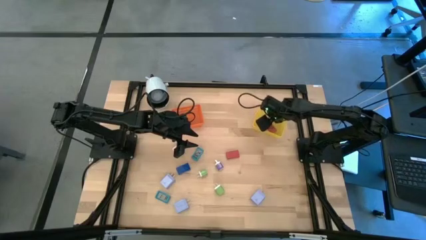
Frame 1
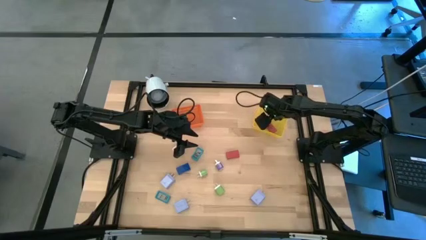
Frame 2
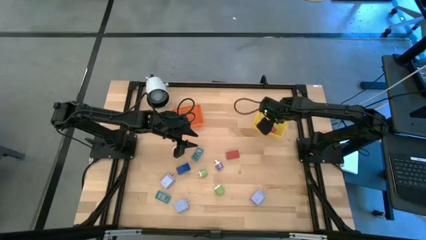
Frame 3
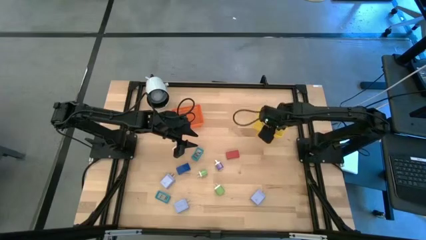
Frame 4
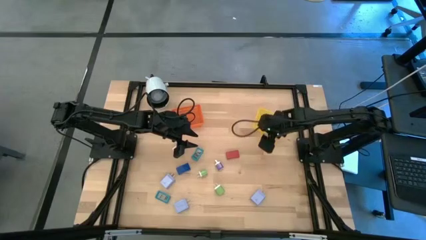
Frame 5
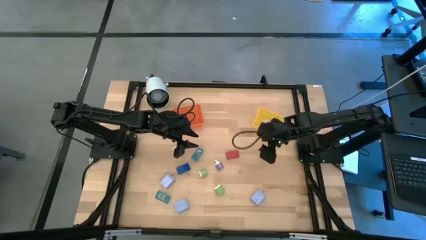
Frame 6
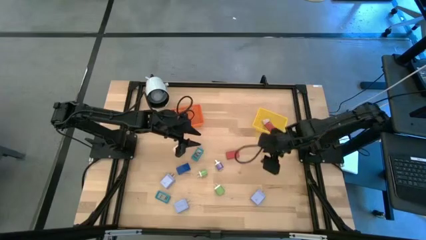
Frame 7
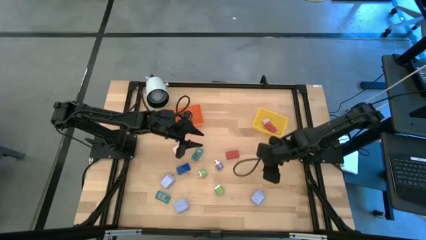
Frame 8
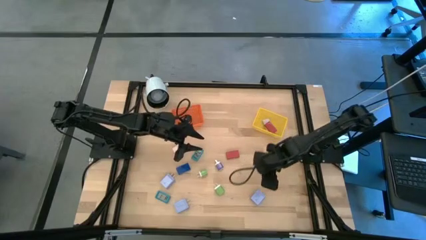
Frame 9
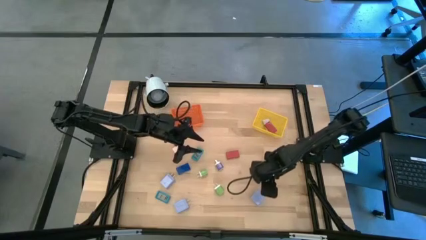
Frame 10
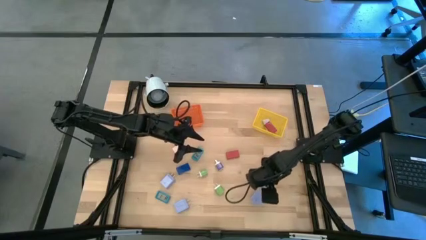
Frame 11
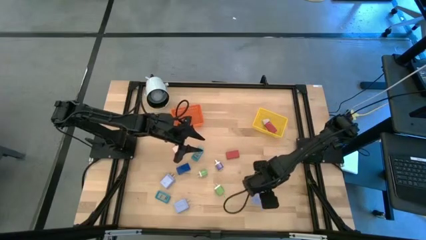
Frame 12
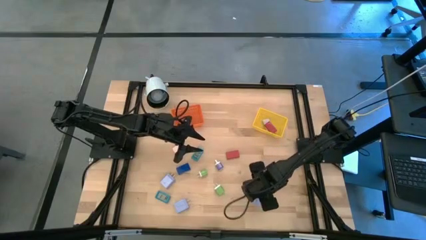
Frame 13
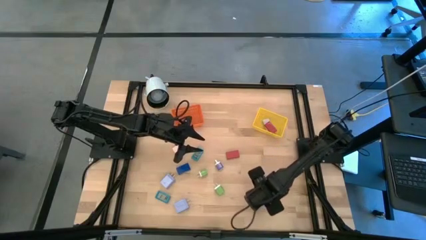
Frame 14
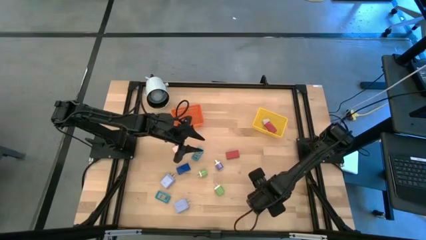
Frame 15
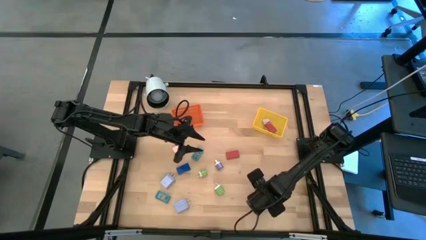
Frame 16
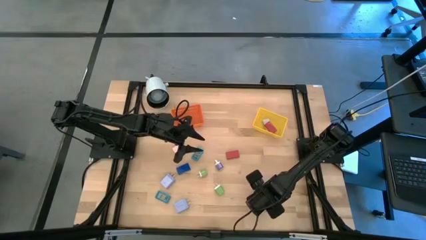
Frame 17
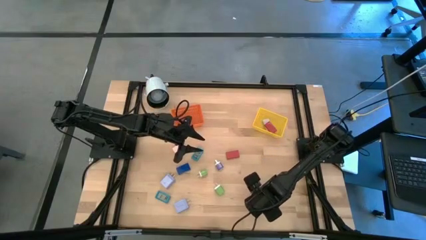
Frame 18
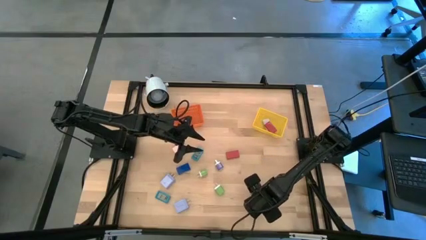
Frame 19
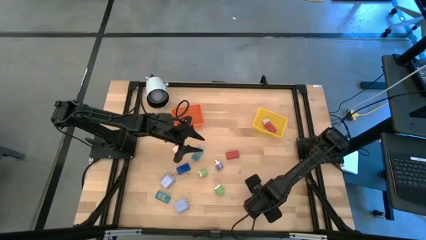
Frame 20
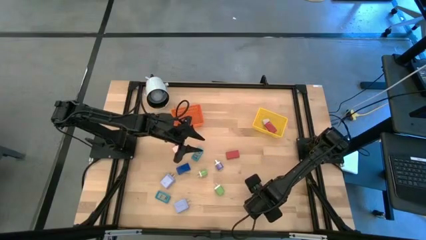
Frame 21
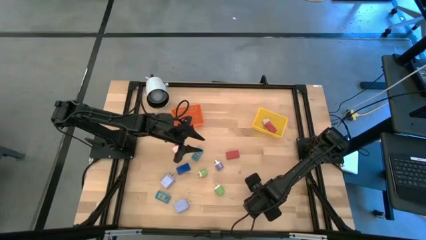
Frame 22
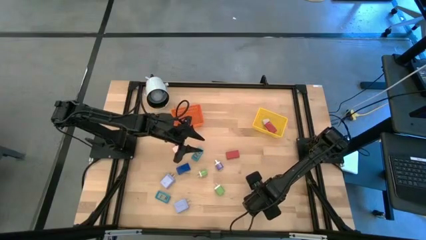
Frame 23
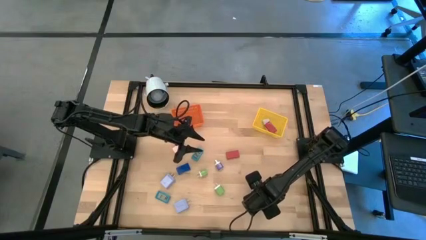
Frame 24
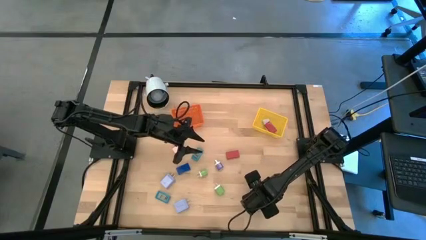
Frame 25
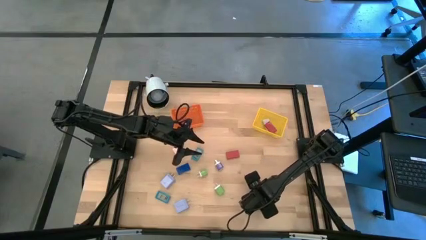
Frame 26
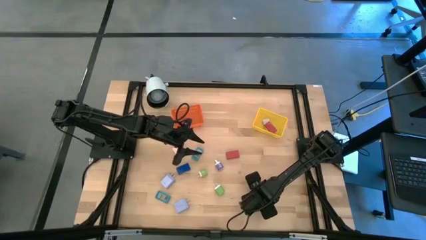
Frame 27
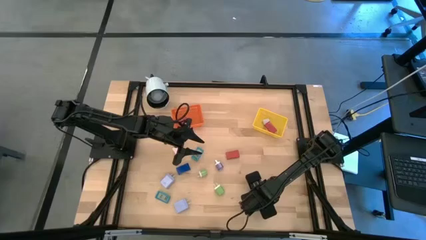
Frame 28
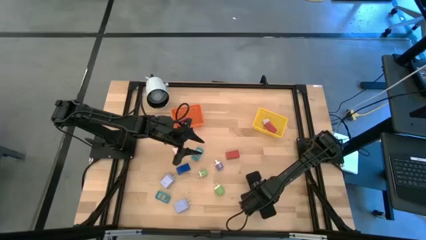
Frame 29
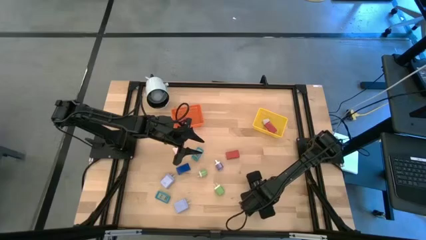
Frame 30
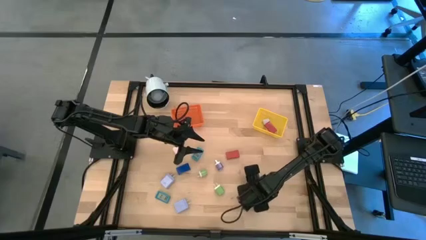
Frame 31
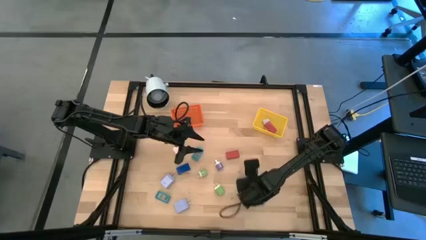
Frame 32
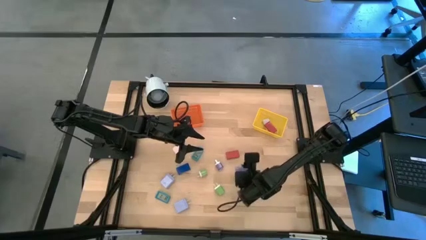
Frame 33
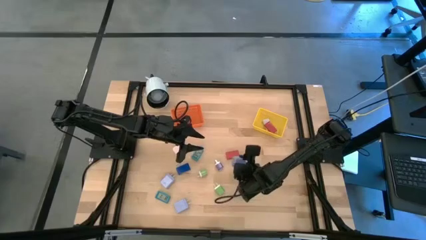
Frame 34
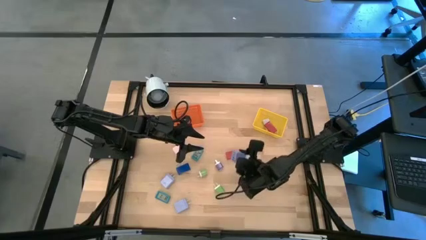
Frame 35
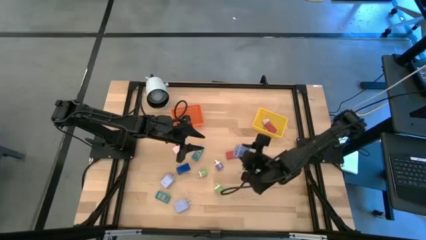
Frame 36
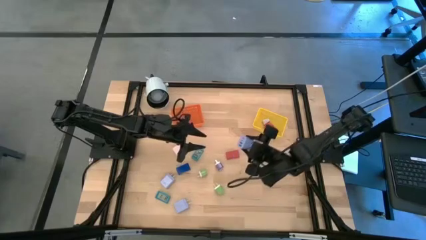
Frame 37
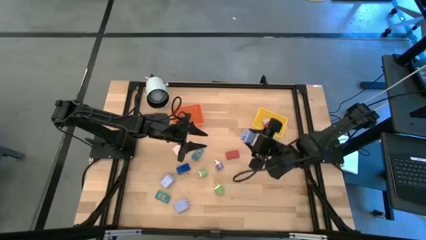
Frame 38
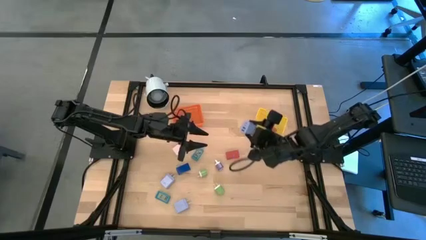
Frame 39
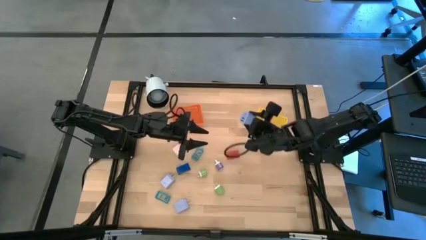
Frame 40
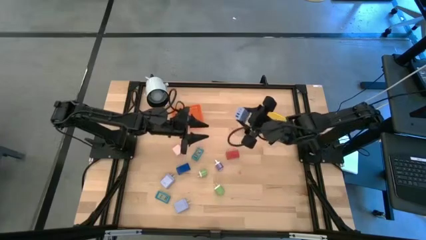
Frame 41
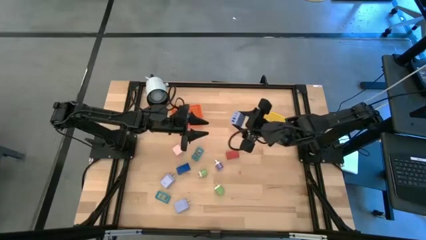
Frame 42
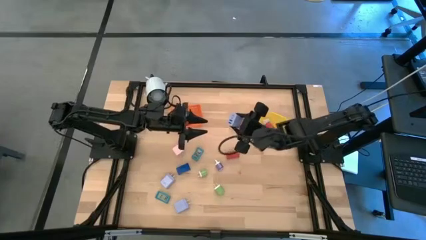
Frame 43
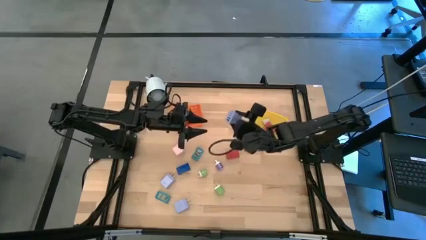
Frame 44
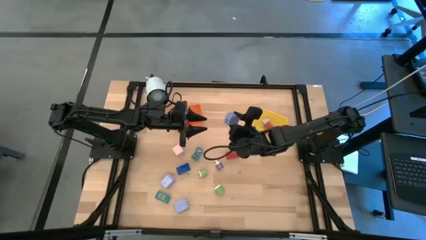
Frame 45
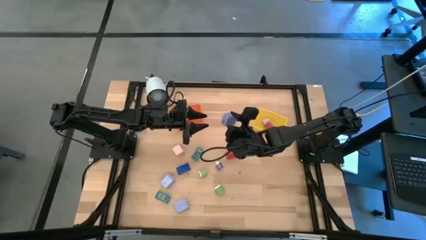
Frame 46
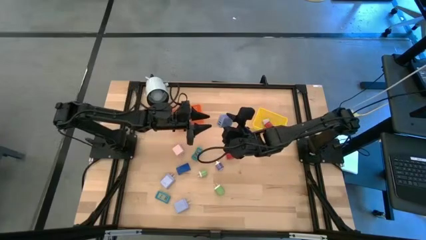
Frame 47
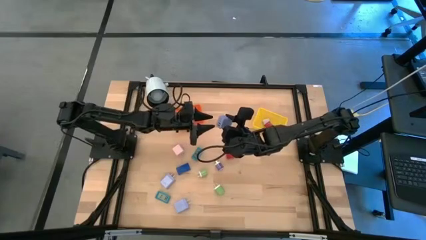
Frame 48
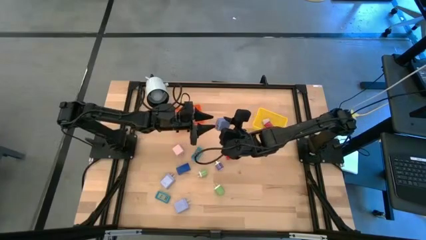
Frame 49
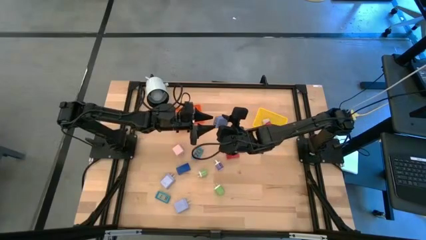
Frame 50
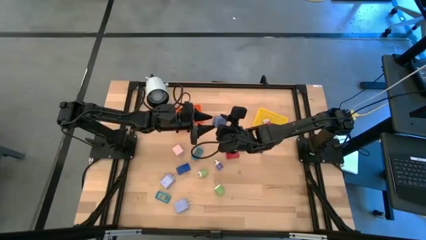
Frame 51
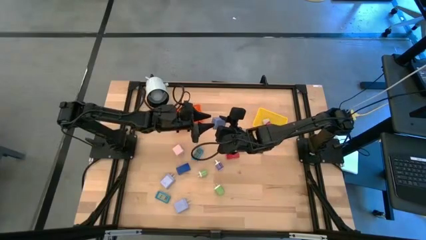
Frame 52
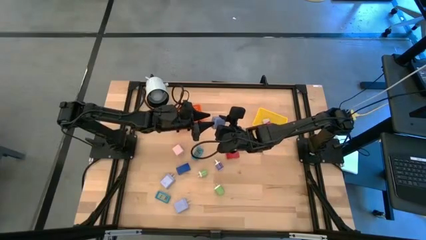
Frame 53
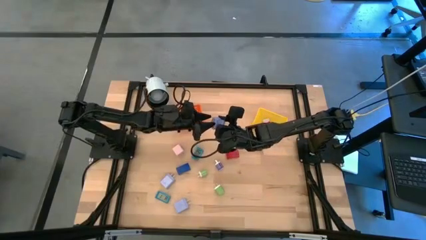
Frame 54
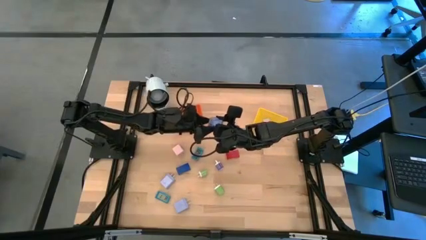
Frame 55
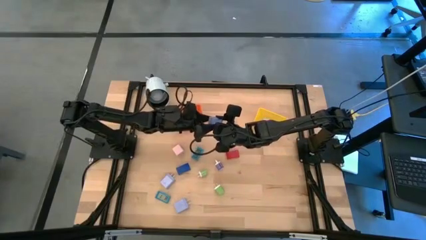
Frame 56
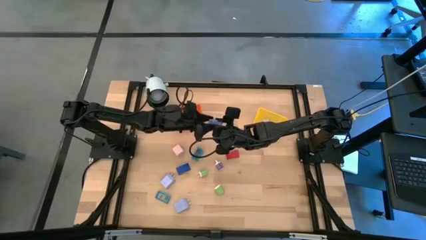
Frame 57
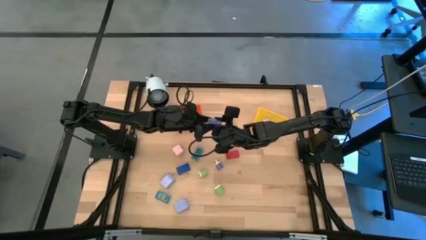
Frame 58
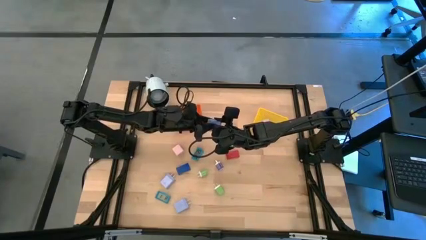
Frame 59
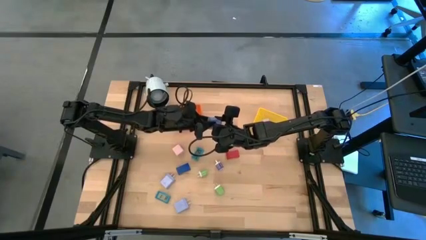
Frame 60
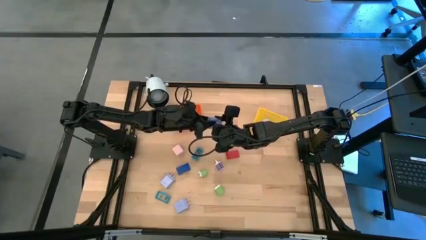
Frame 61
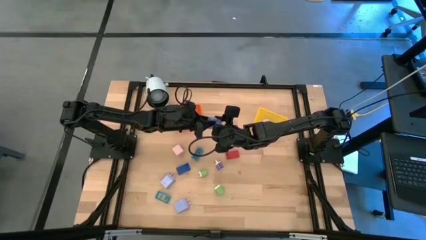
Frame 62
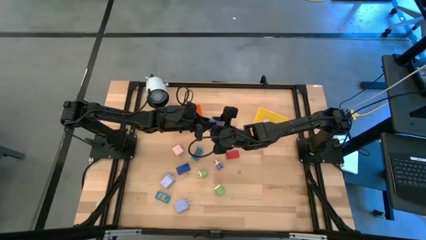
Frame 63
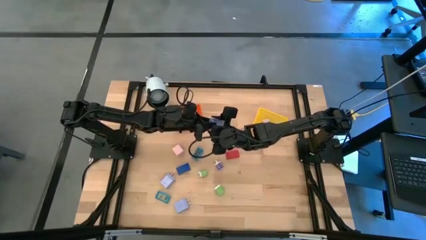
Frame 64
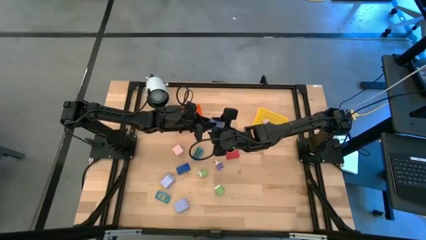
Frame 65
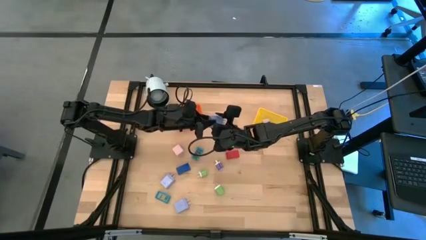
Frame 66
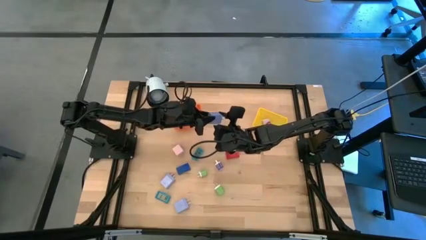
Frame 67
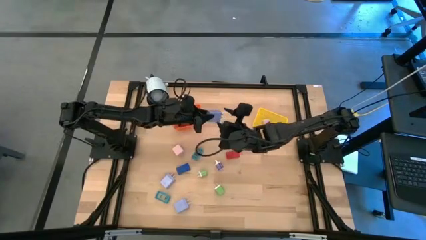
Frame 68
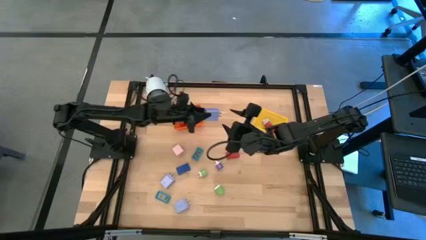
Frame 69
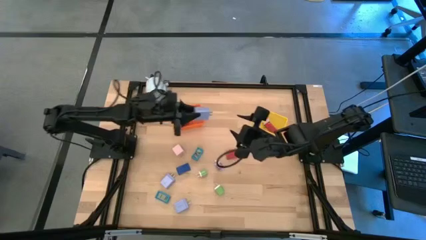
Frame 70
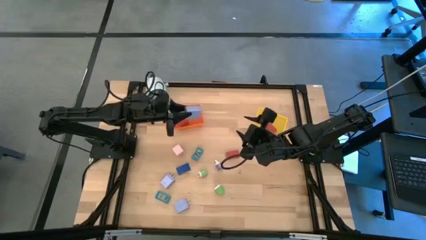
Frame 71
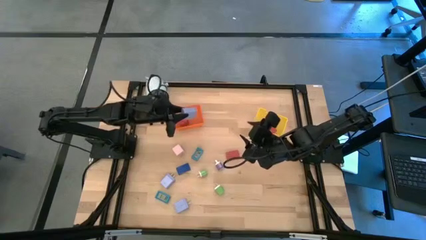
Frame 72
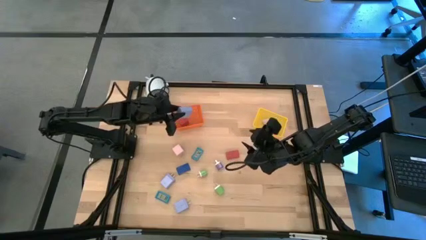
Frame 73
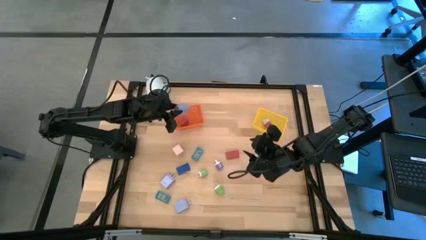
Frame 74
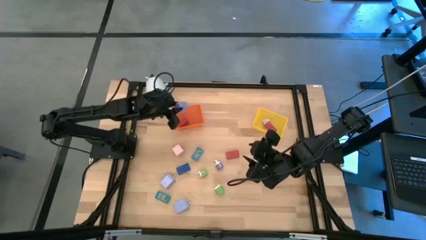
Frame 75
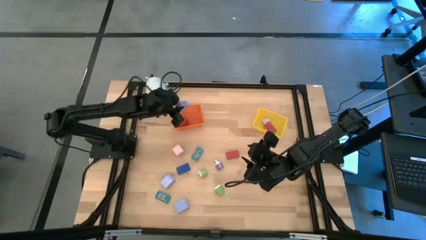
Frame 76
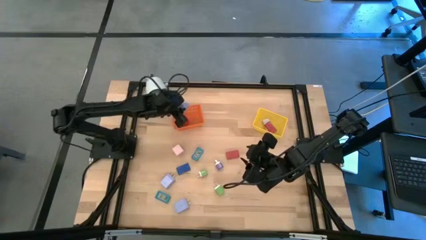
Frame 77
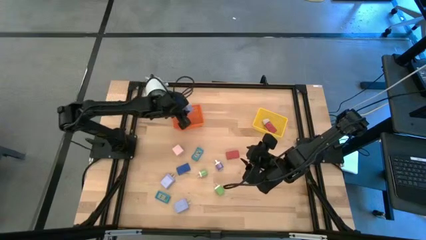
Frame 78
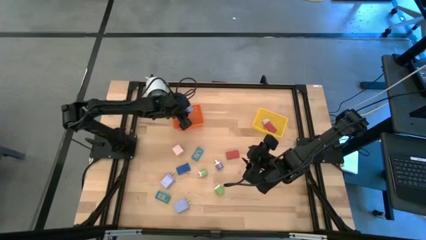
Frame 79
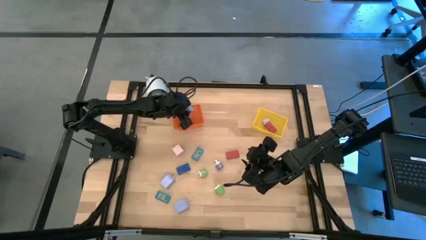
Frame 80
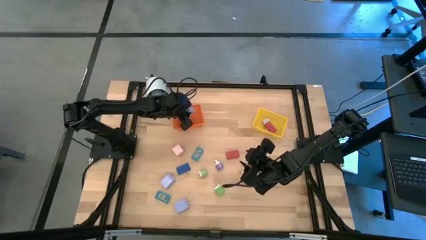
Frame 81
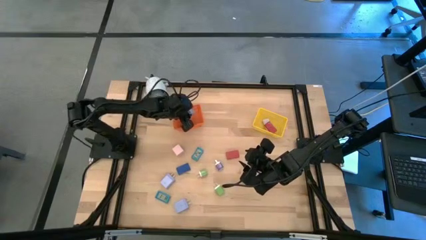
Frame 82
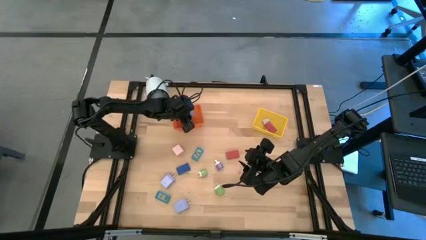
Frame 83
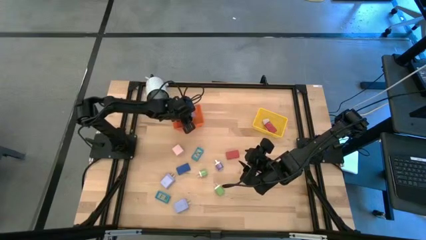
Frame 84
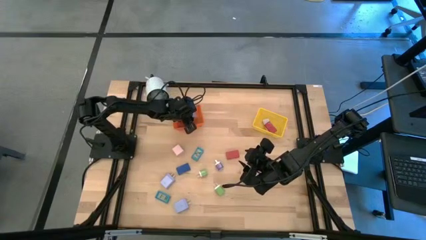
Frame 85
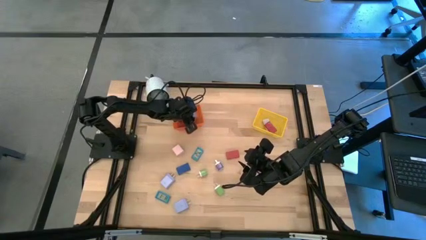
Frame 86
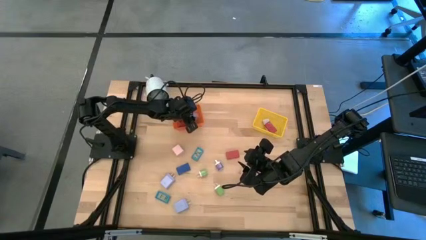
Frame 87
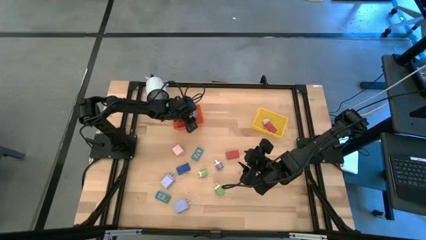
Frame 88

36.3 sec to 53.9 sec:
Task: Pick & Place Office items
Put the bottom right purple charger adapter into the orange bin
